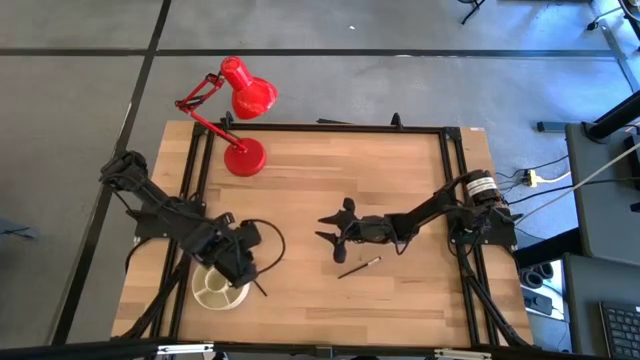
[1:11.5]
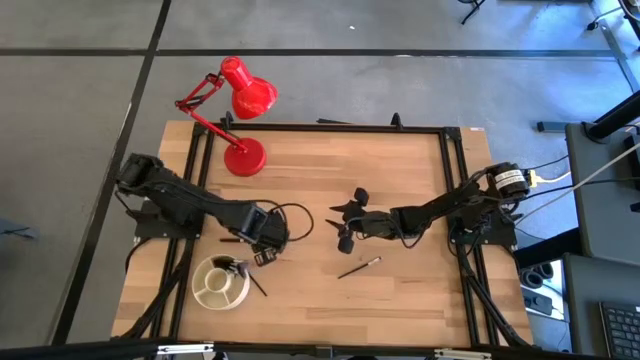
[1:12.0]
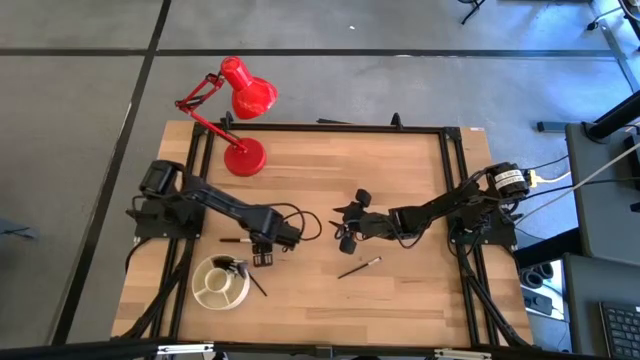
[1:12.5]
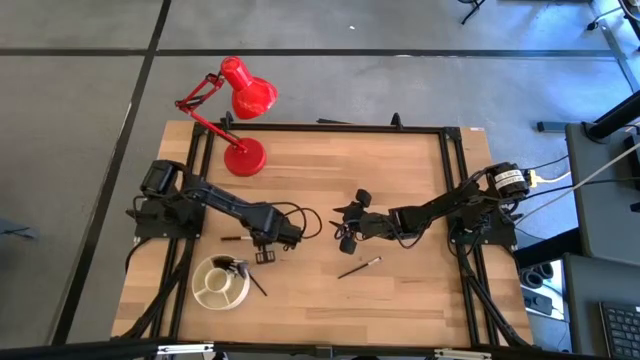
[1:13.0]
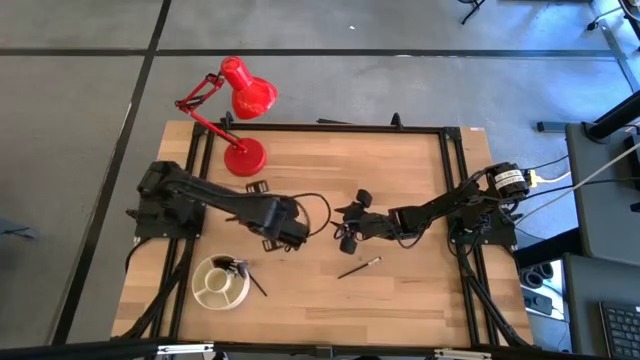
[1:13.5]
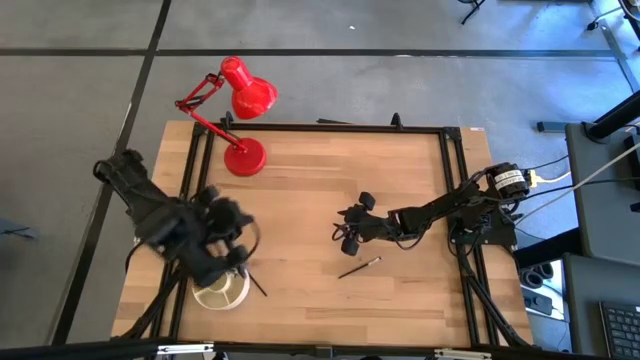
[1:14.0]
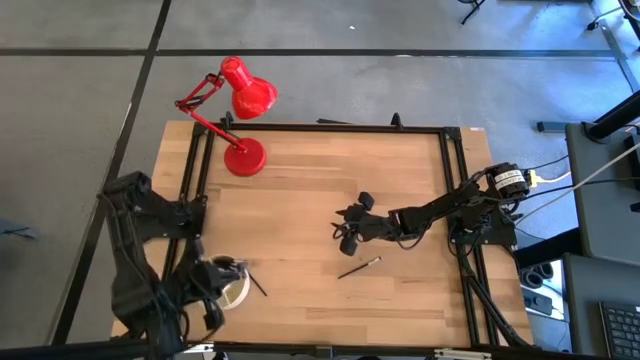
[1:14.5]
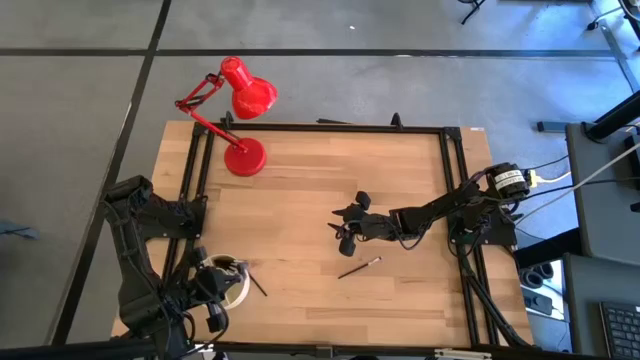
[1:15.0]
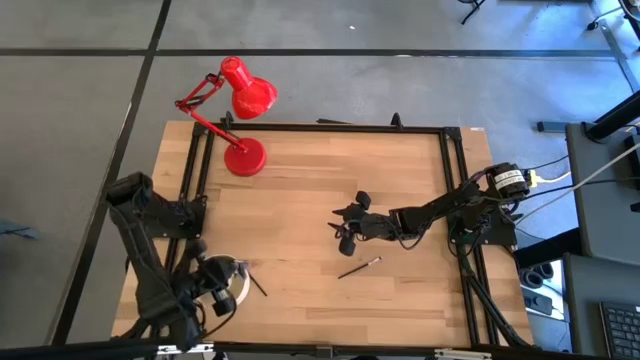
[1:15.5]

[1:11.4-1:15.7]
Task: Put items in baskets/containers
Put the black powder brush into the white organizer bin

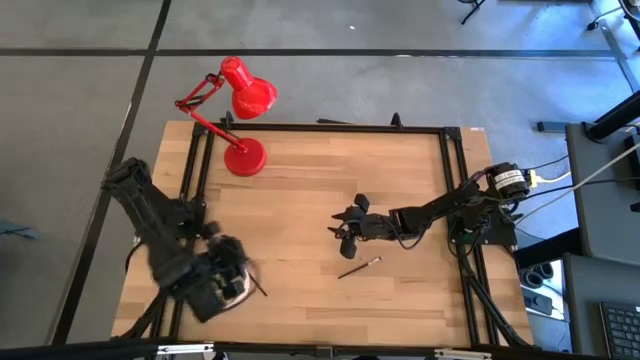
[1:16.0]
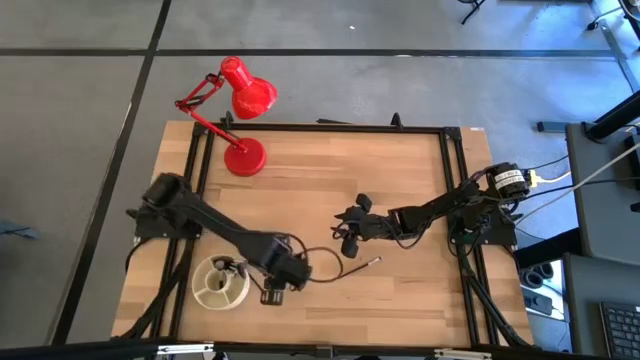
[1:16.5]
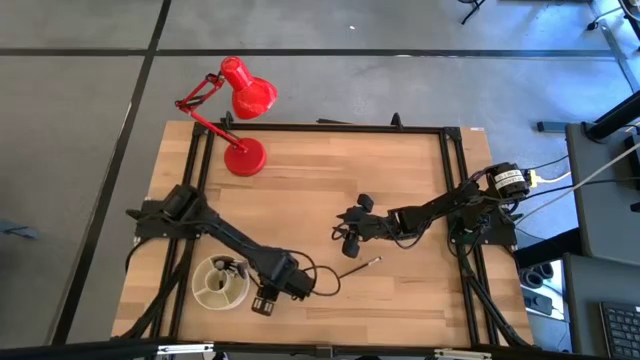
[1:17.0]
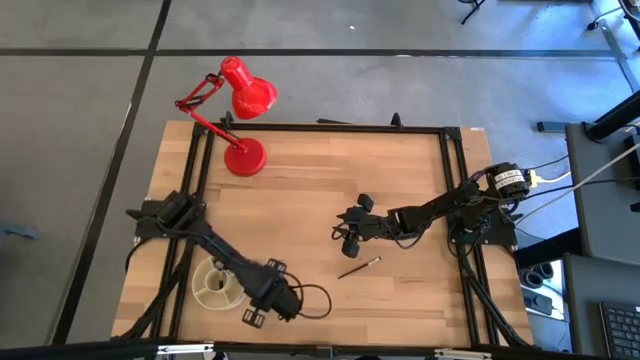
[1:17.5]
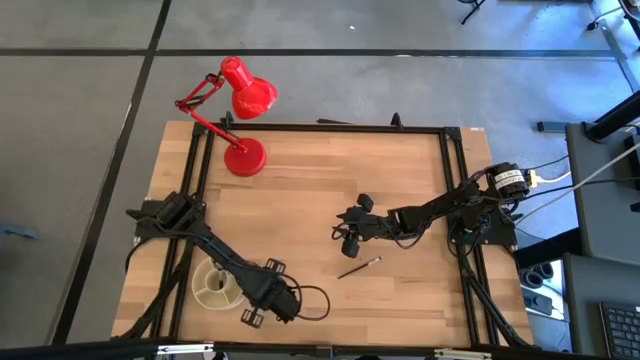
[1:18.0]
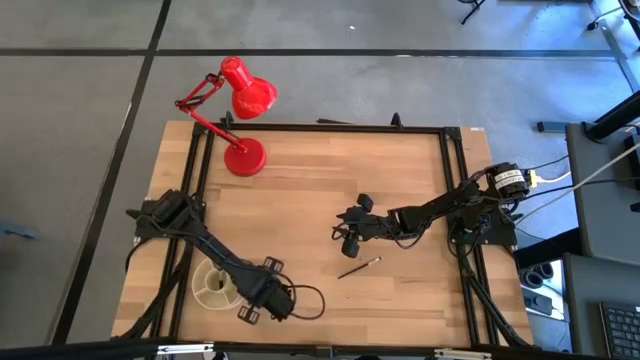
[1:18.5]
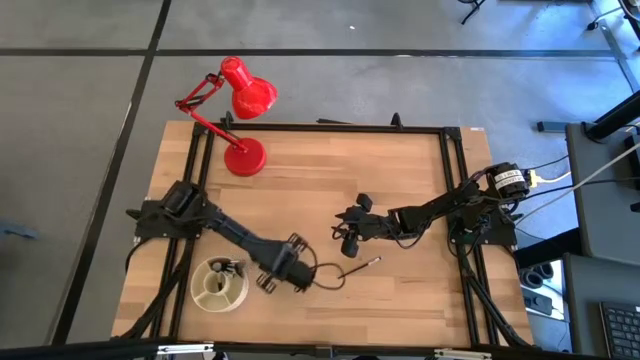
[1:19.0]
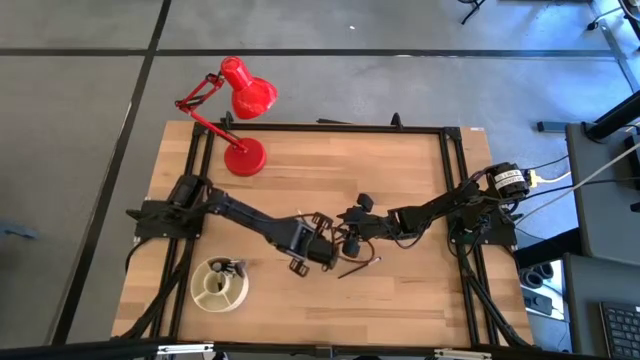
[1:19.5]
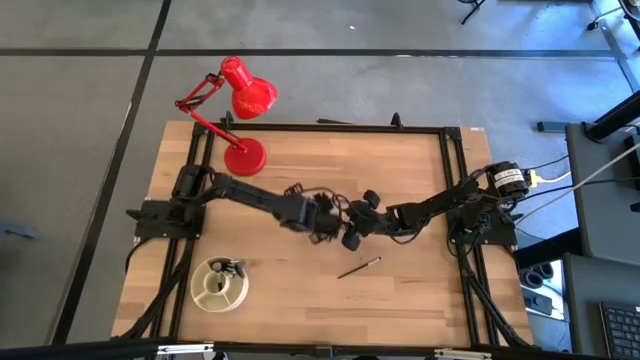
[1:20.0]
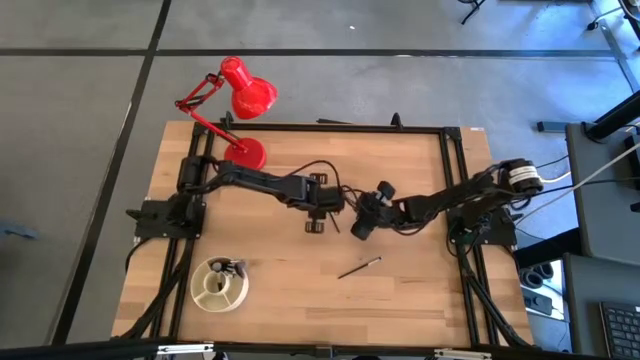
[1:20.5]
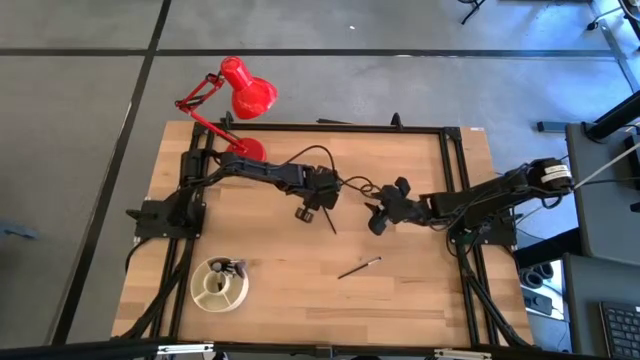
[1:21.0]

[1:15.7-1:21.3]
Put the black eyeshadow brush into the white organizer bin

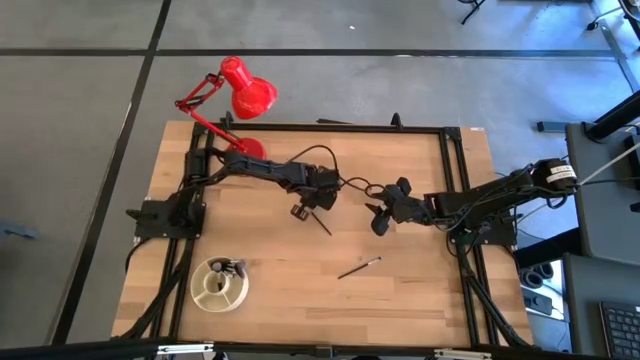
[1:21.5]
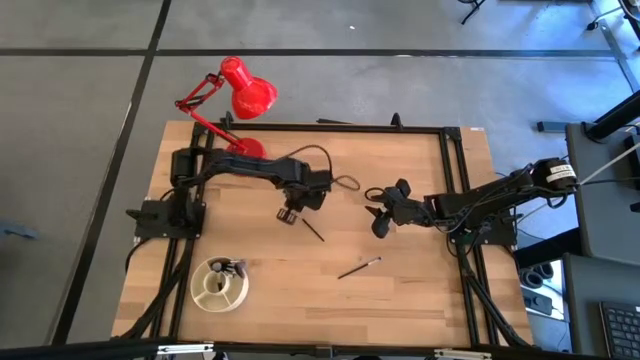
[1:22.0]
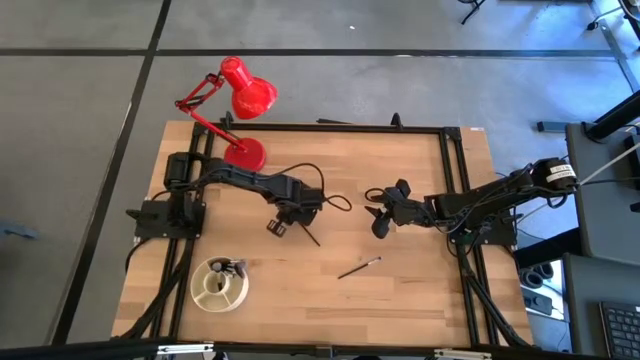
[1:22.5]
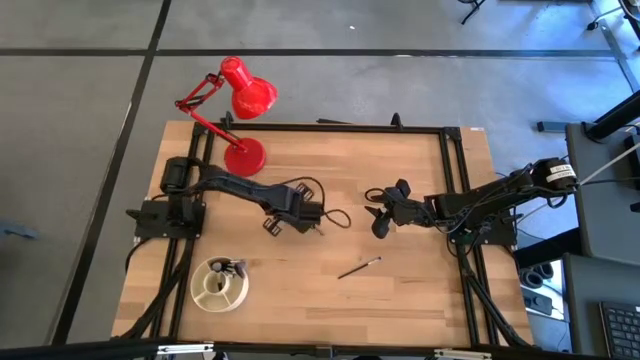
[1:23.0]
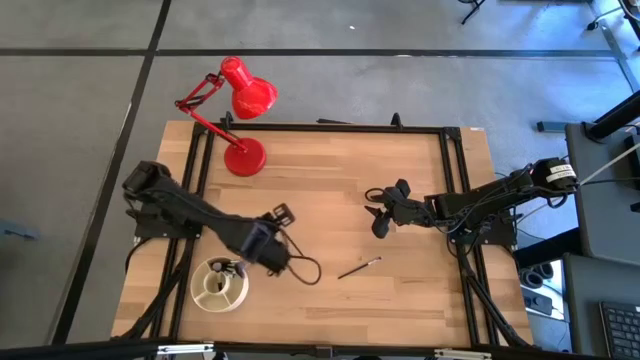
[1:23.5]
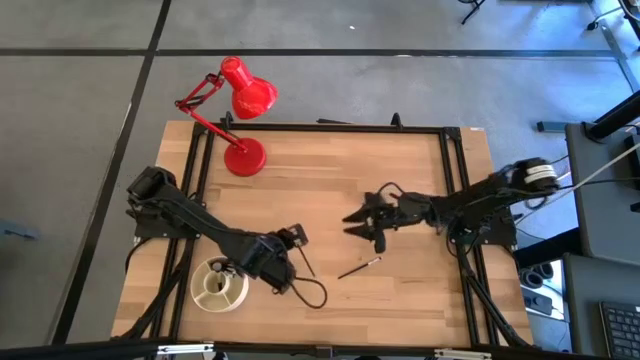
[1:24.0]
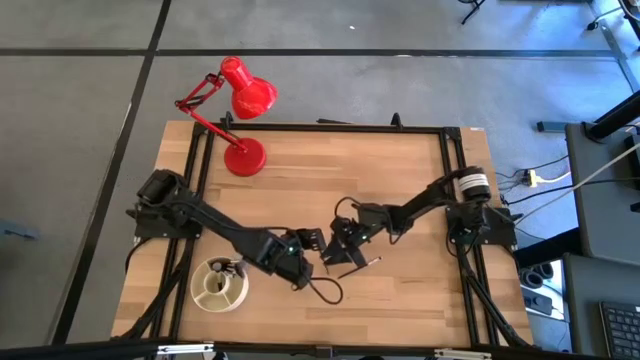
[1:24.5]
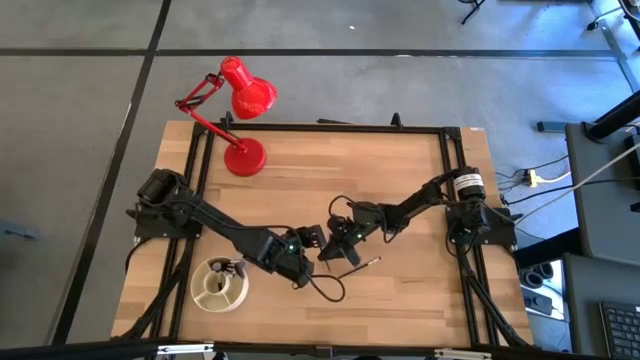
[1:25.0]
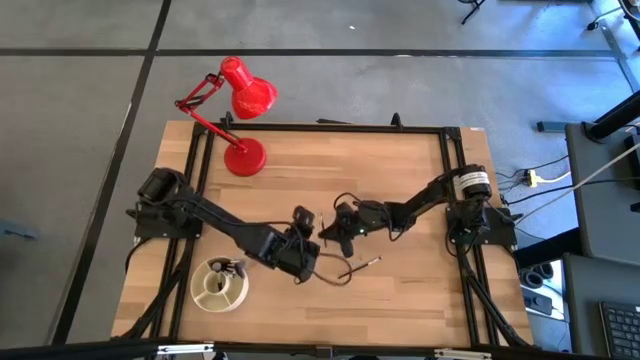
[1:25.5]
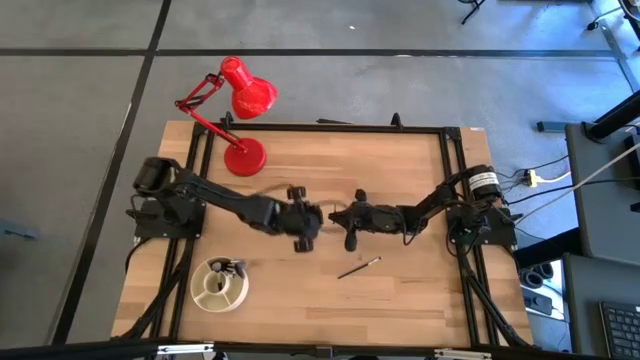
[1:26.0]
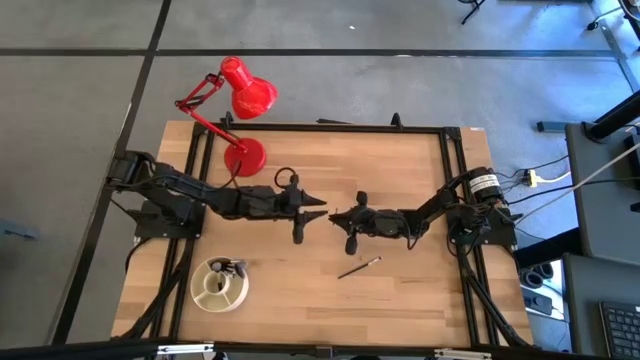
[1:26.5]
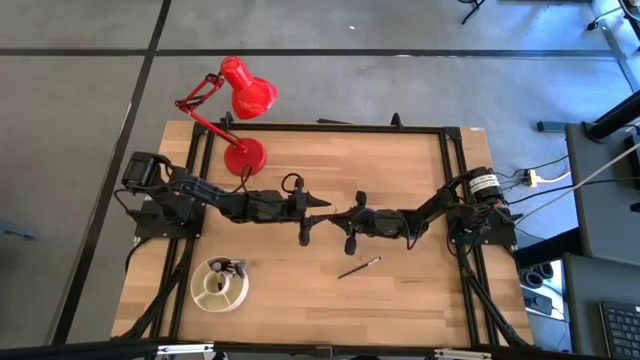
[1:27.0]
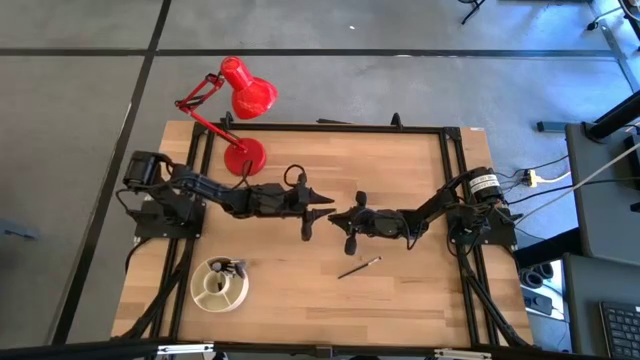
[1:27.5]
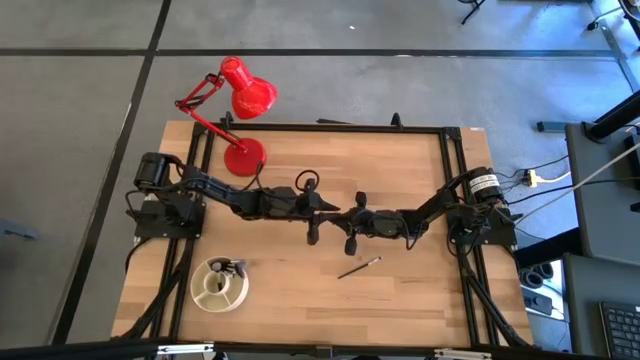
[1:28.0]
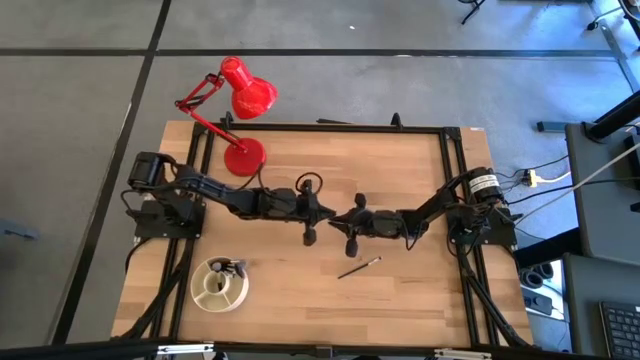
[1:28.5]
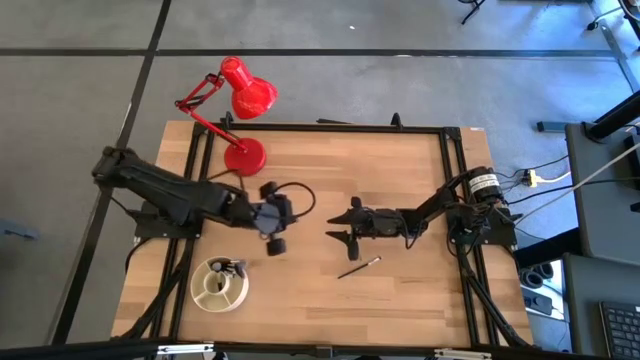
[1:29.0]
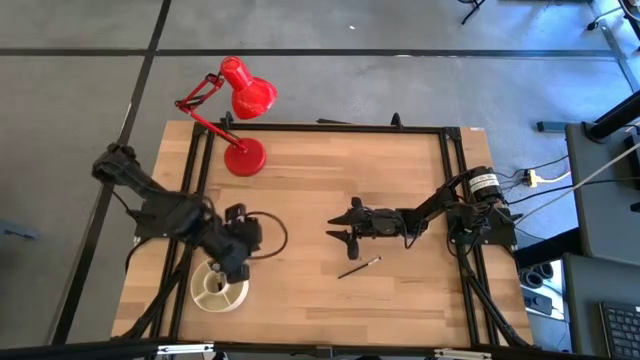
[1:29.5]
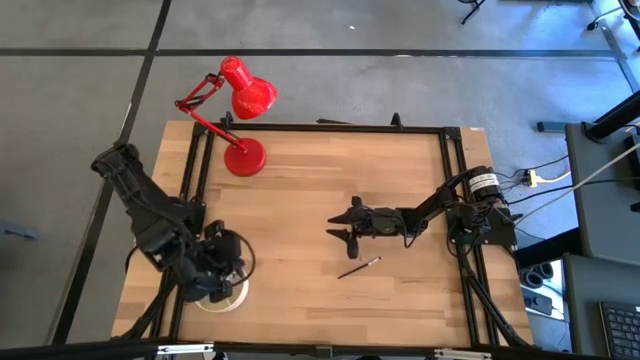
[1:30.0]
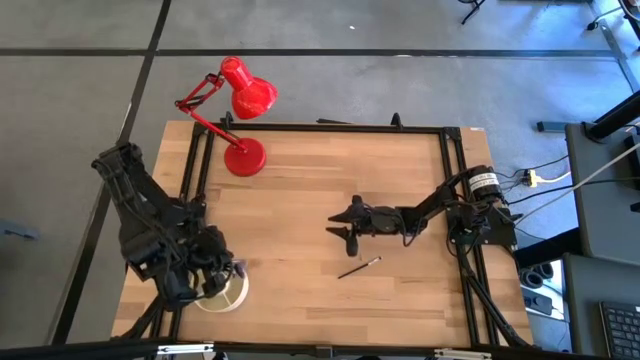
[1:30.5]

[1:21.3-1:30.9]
Put the black powder brush into the white organizer bin

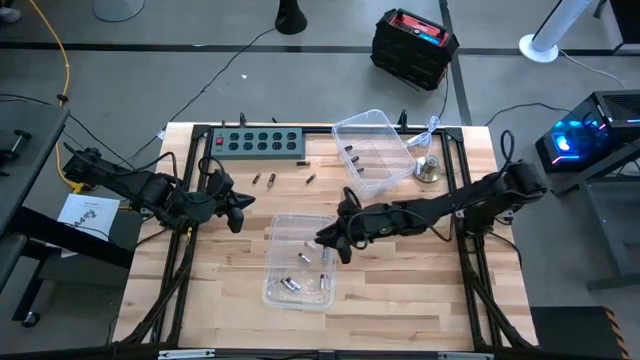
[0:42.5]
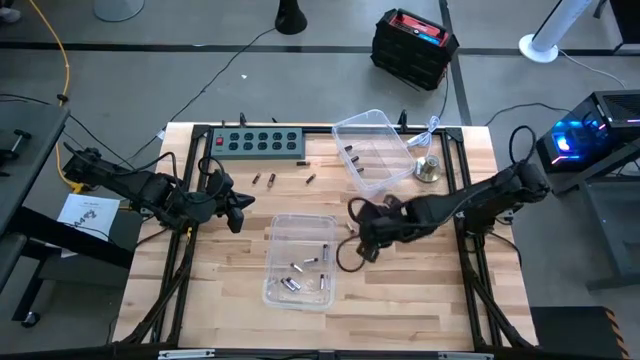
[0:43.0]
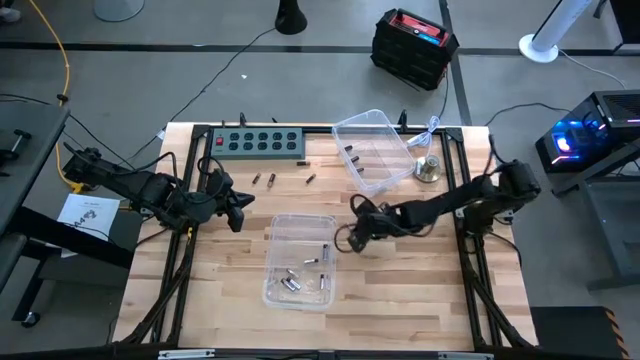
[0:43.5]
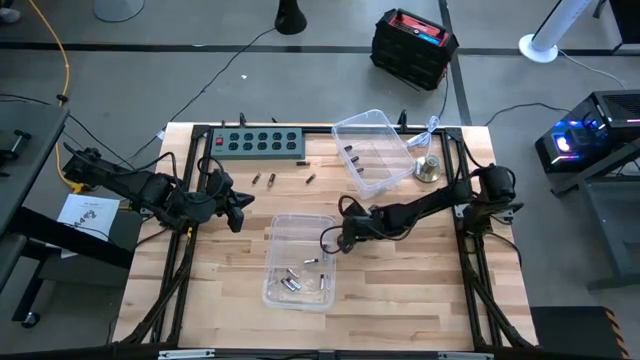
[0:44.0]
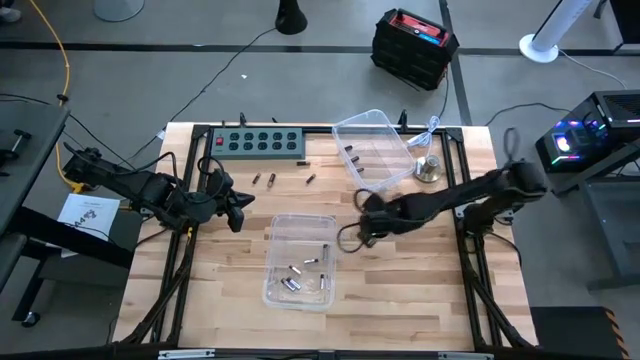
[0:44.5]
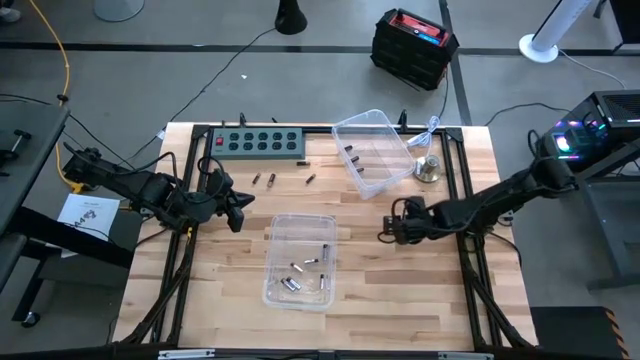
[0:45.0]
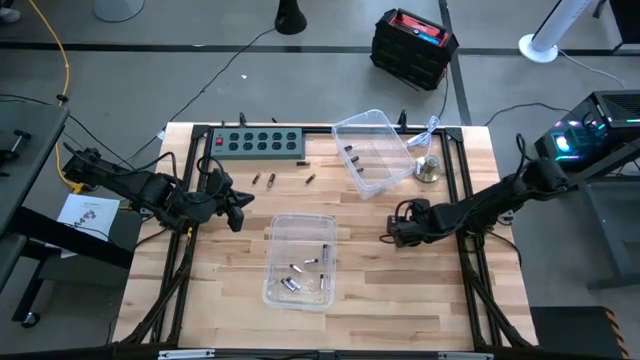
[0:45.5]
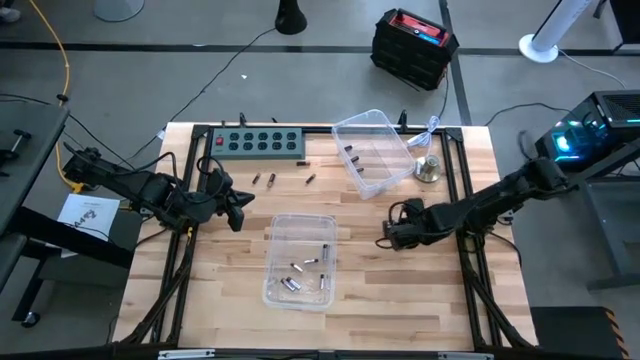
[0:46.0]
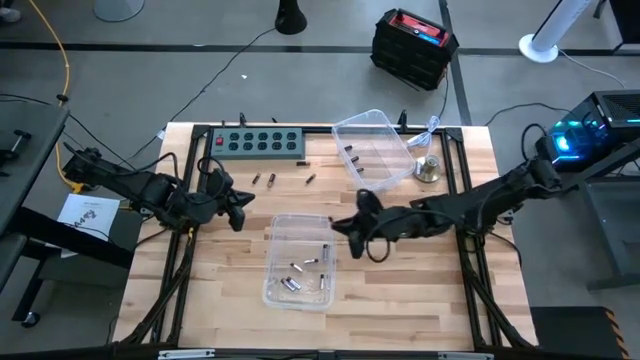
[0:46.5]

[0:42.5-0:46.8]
Task: Sort batteries
Put the silver battery into the left transparent bin
